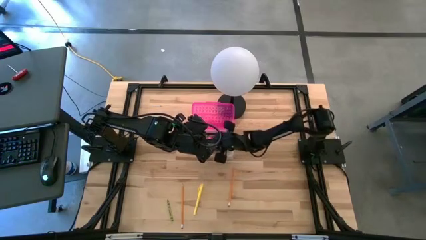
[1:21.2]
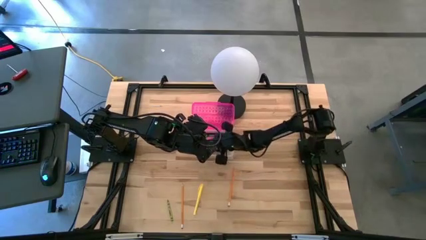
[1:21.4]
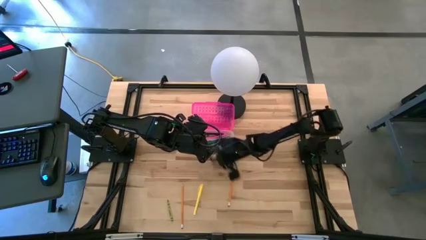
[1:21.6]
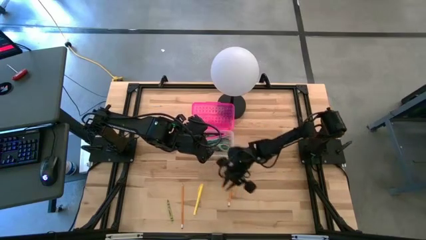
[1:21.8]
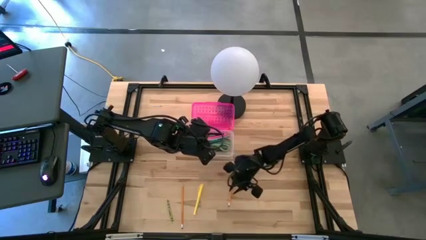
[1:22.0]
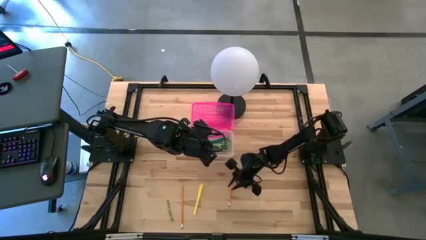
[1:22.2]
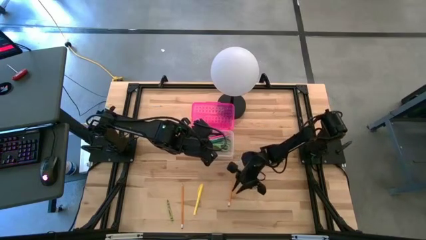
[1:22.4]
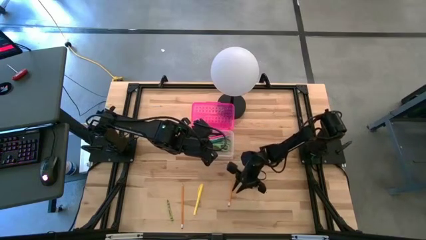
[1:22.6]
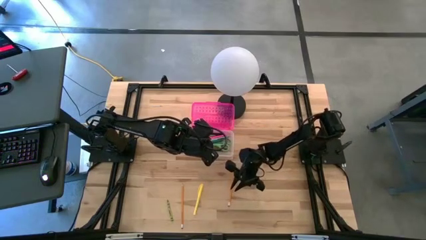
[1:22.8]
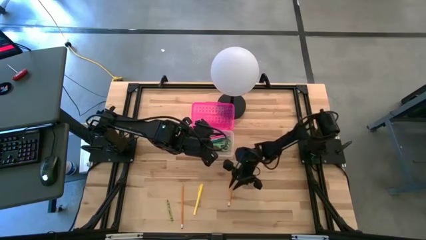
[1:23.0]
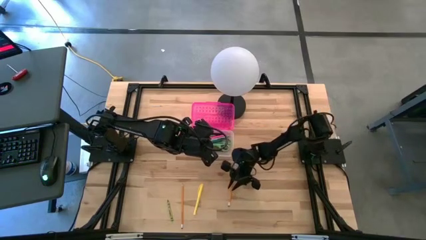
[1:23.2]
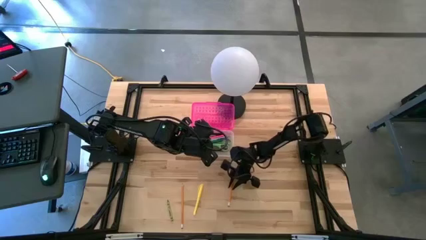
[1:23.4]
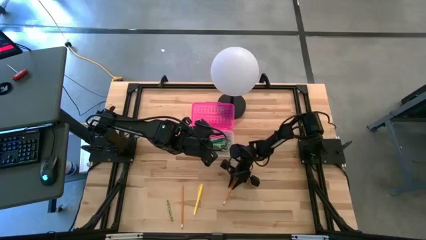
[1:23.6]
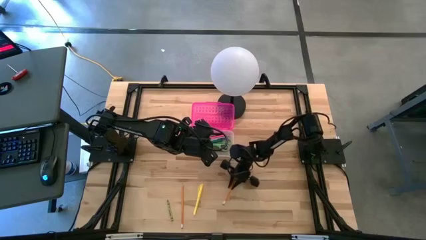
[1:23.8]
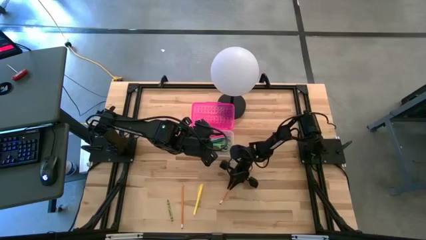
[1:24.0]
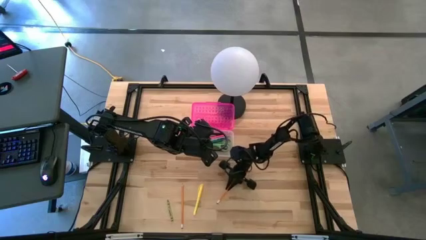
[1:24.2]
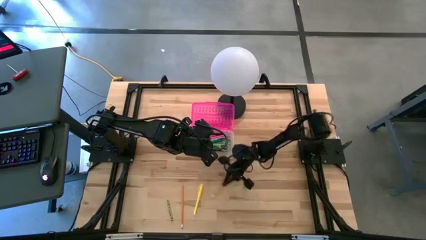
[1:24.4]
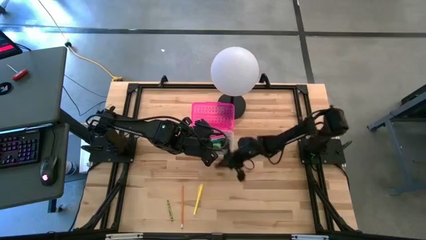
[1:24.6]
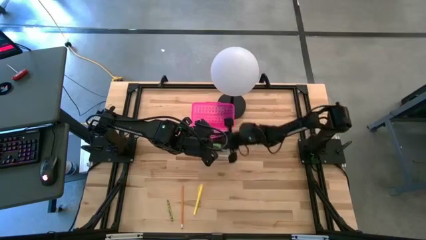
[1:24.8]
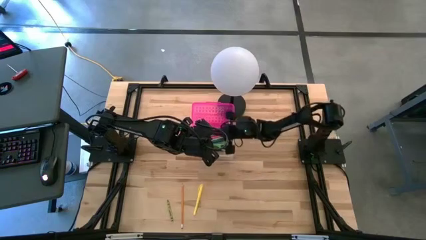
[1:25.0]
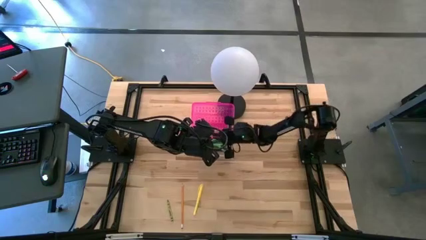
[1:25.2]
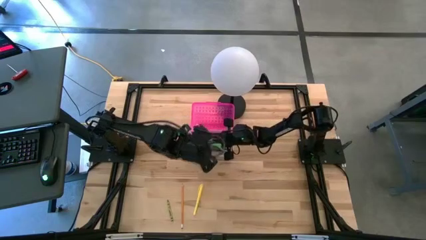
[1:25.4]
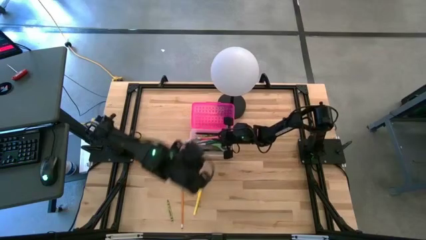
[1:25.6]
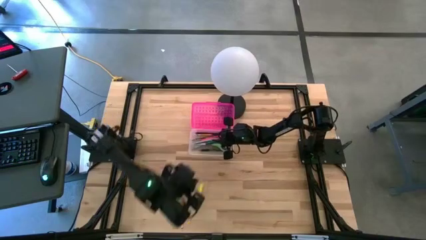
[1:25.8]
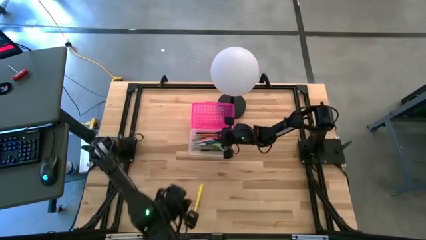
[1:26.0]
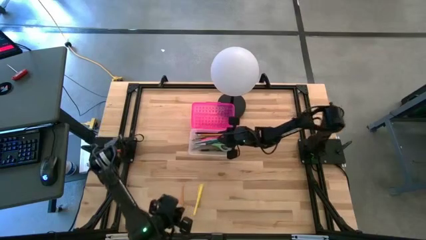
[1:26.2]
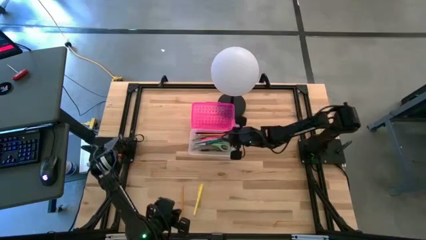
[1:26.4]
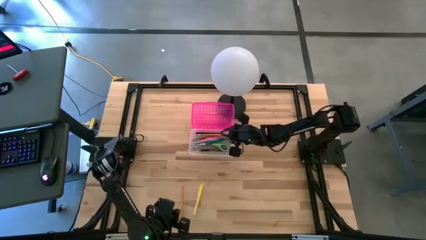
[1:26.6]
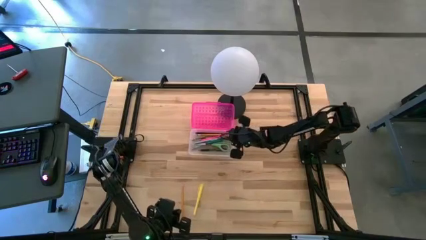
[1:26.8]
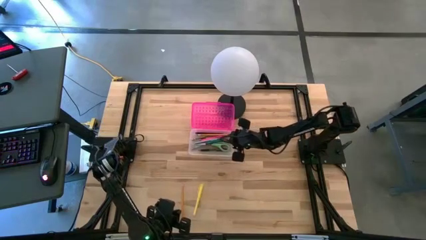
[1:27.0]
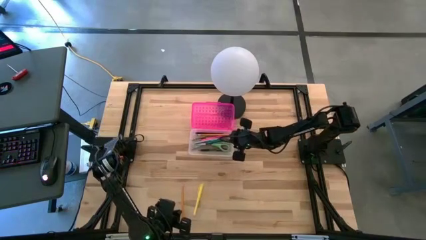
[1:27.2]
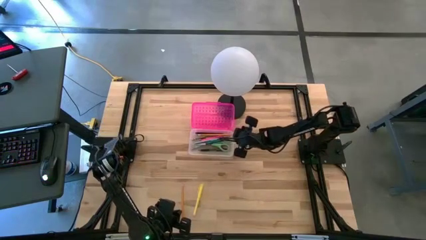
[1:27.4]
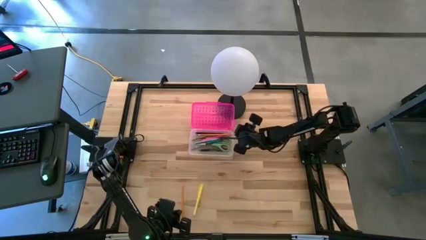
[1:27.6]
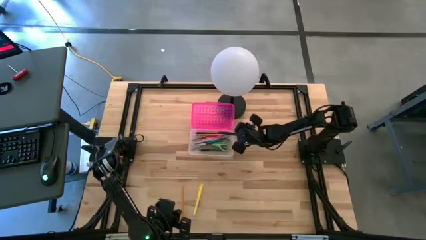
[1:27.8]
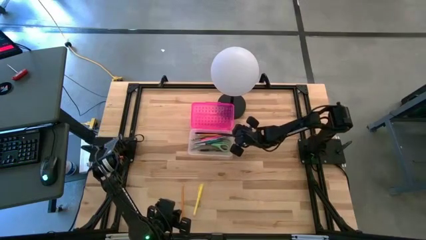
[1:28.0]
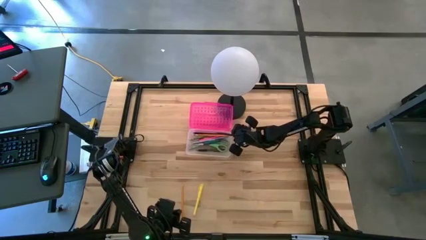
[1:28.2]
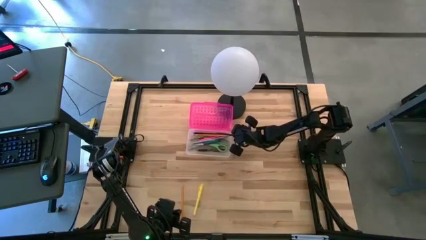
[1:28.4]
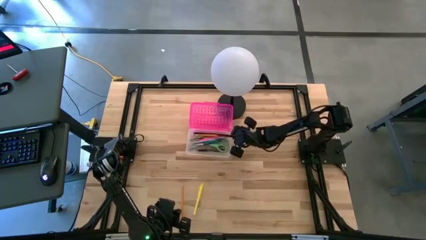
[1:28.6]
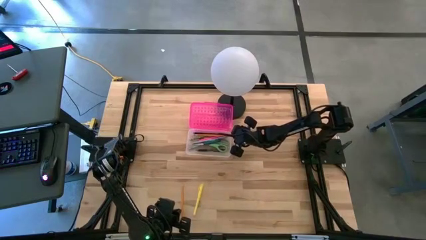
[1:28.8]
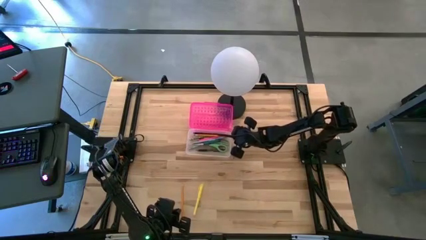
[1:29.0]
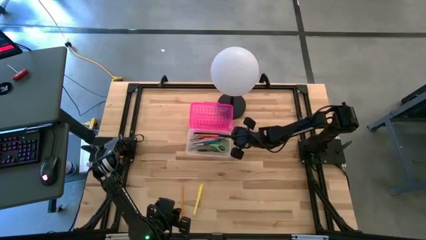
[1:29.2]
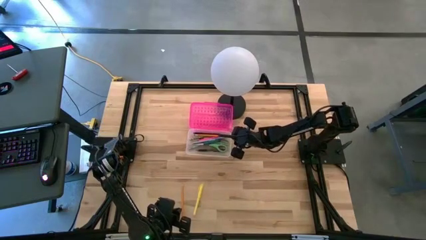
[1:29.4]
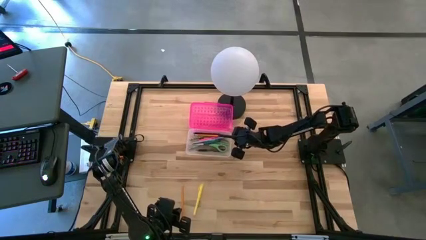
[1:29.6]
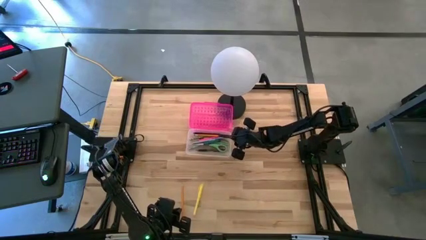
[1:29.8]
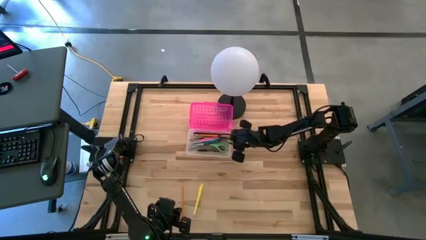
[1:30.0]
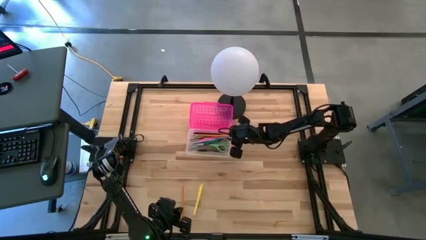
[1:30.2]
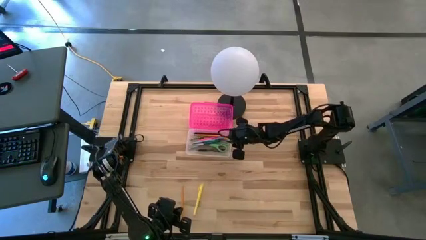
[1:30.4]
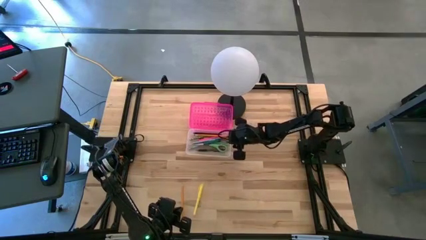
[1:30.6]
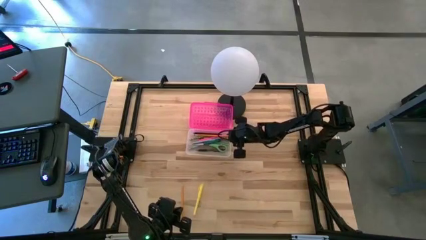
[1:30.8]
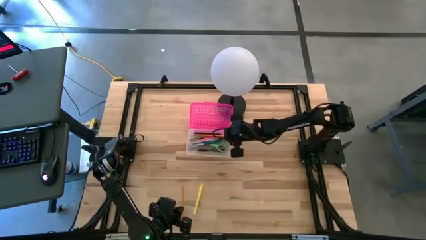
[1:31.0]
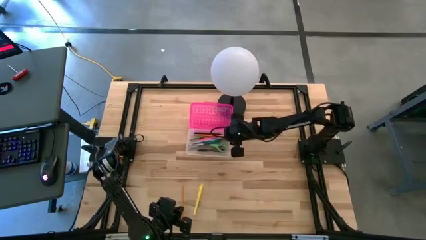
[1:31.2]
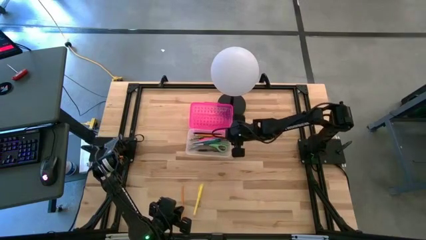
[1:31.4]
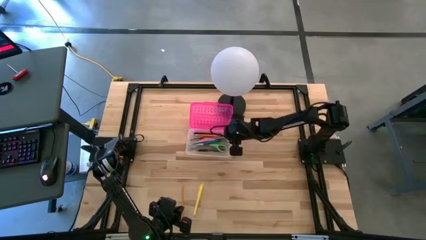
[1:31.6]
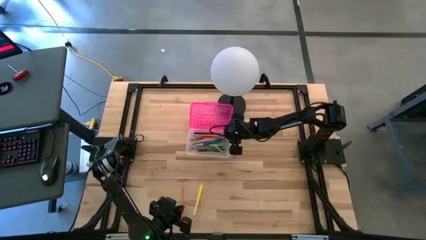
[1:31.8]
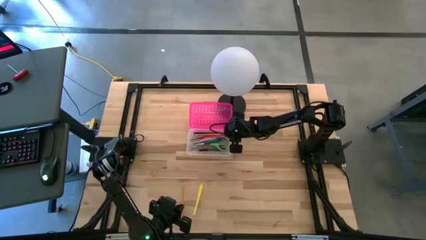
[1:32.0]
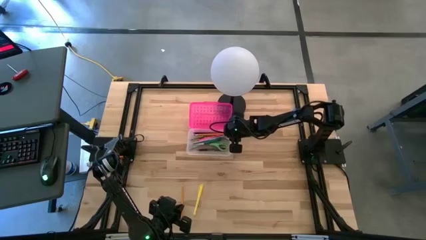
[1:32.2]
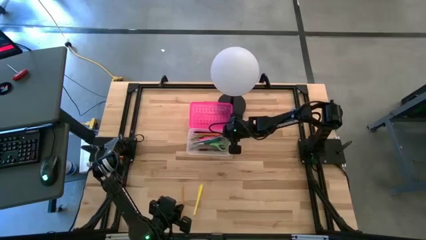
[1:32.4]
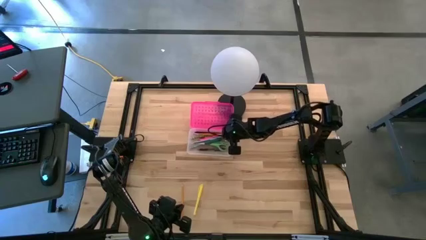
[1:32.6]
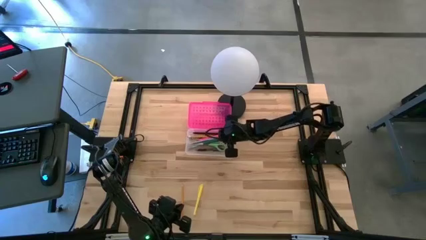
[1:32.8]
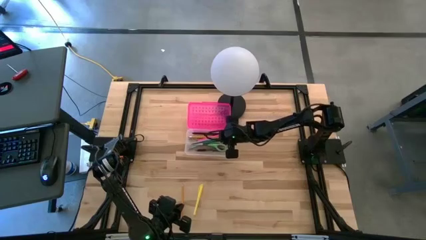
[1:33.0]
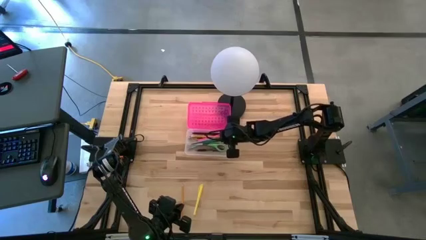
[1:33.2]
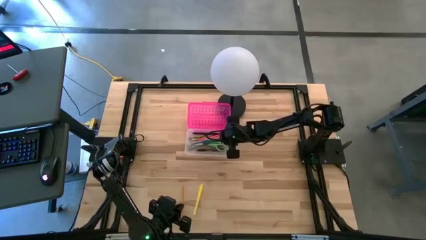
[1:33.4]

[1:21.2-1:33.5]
Task: Pick & place school supplies into a supply box
Put the right orange pencil into the pink supply box

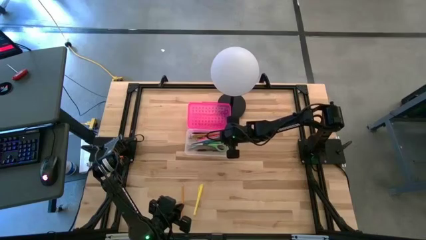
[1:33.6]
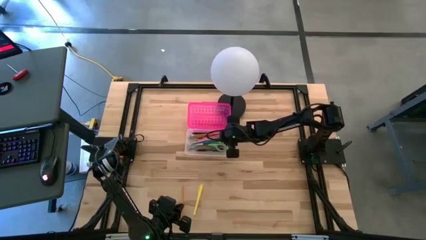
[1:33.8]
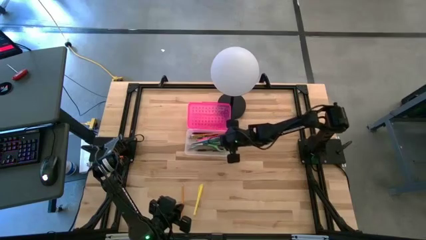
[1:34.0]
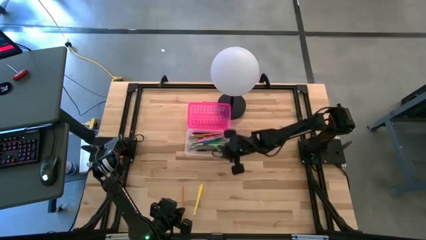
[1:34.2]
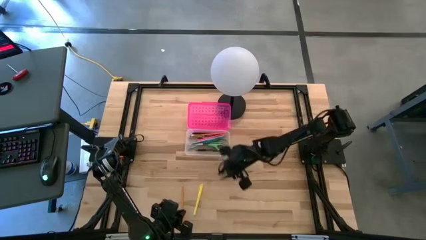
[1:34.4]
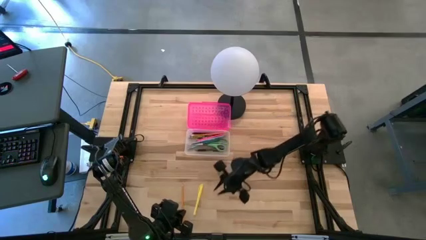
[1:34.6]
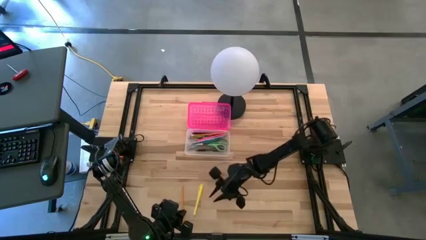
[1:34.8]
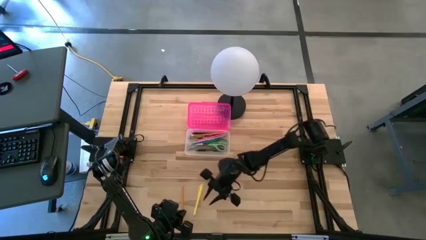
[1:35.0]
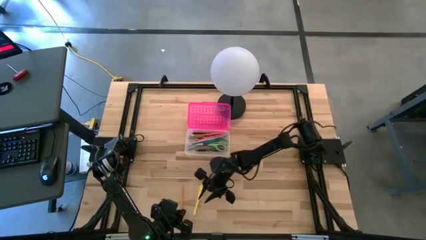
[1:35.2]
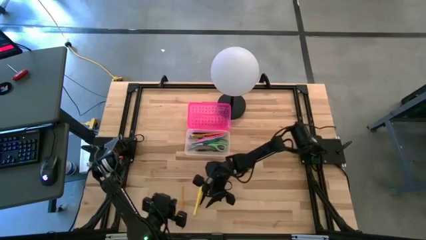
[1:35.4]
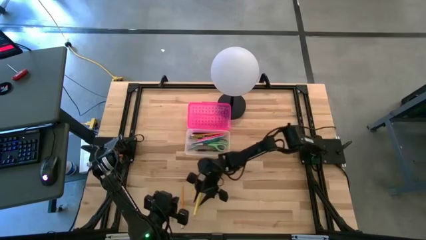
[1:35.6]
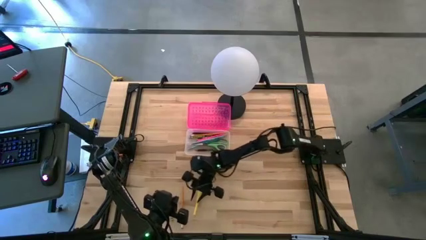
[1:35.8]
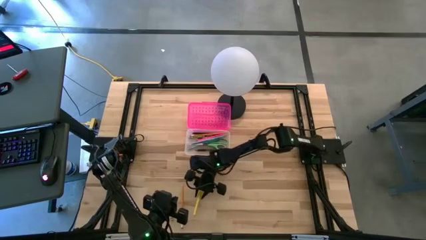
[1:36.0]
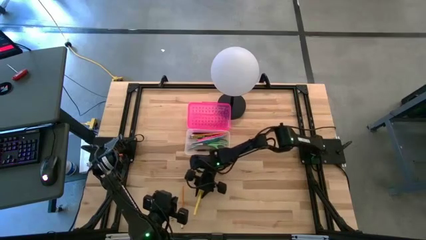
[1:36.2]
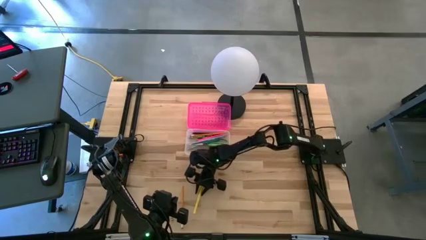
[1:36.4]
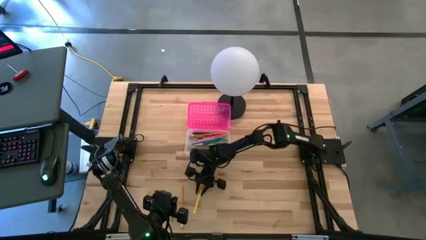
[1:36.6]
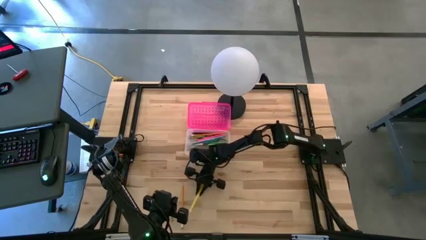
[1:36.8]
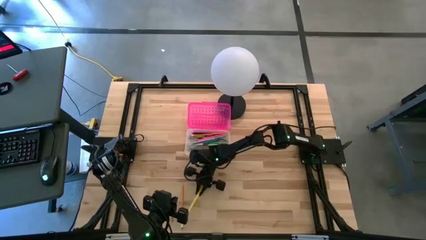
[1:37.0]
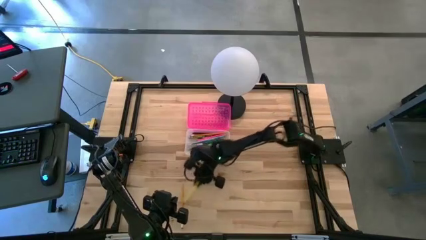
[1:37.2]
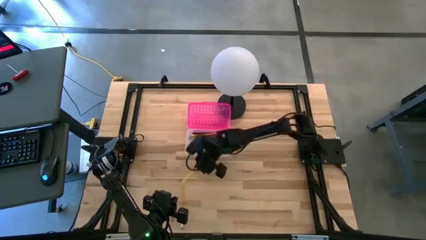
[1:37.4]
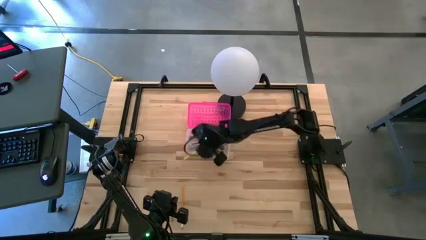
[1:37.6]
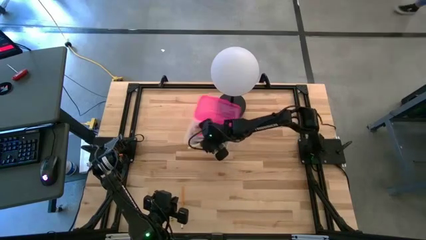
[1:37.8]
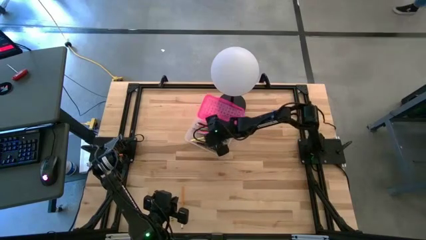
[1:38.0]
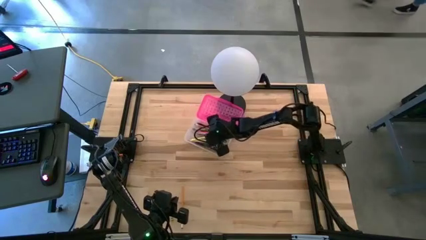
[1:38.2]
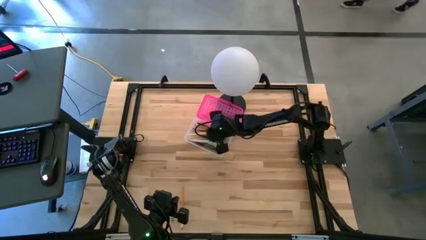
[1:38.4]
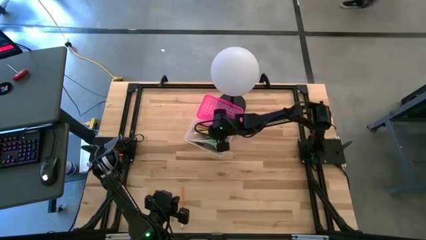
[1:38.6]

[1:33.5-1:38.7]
Put the yellow pen into the pink supply box
